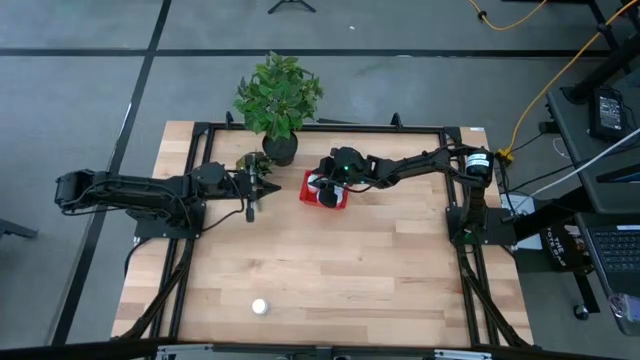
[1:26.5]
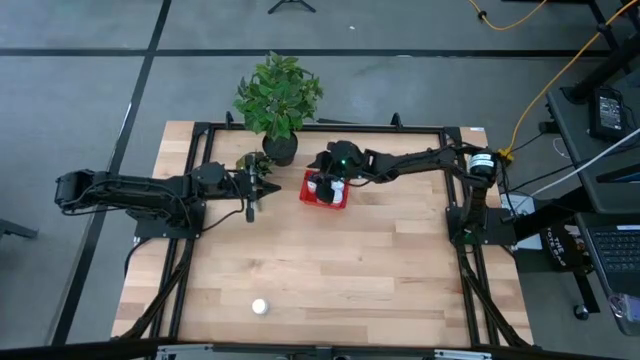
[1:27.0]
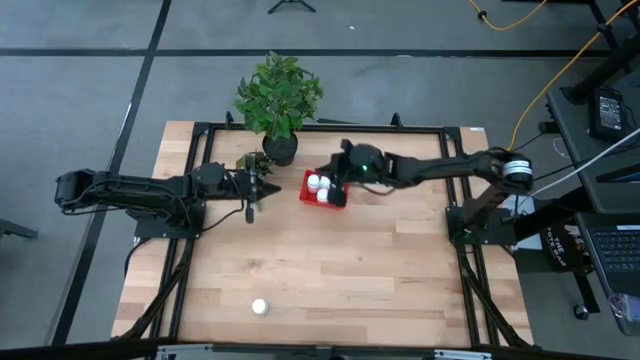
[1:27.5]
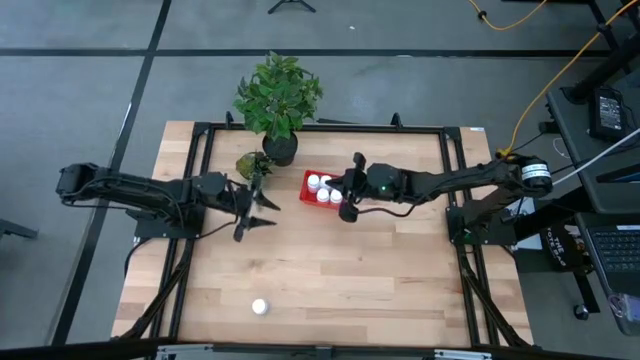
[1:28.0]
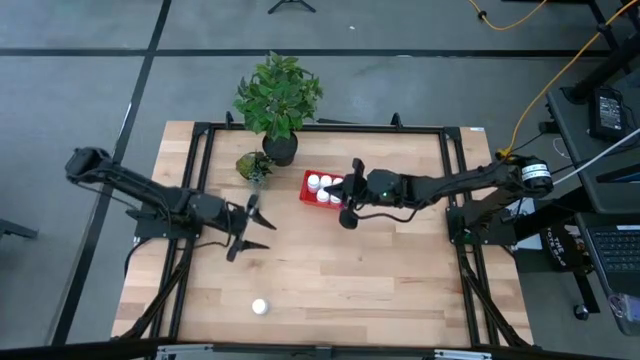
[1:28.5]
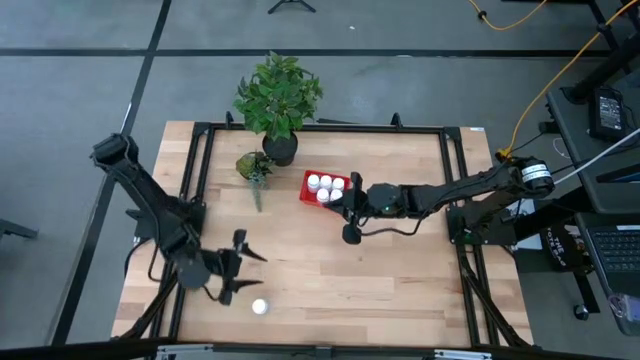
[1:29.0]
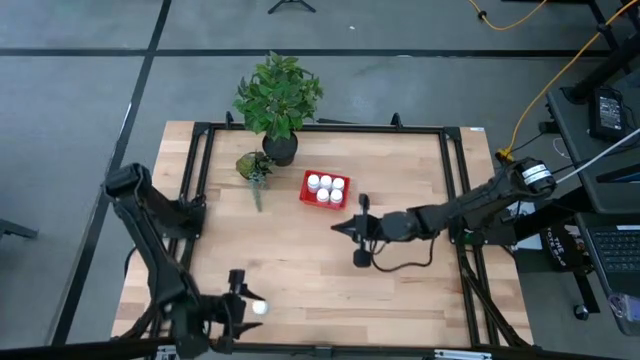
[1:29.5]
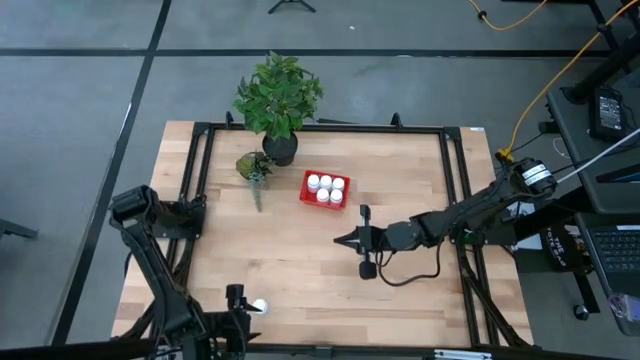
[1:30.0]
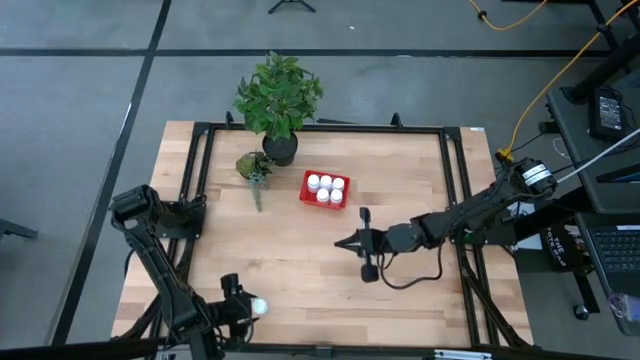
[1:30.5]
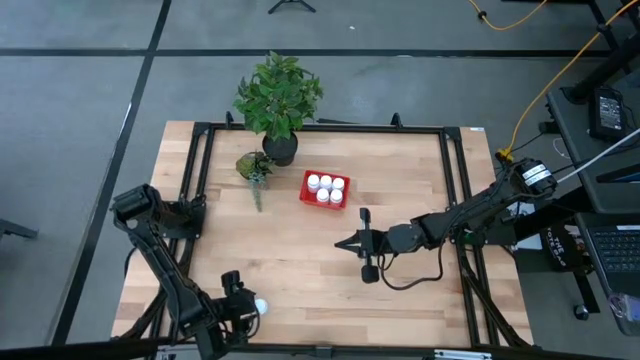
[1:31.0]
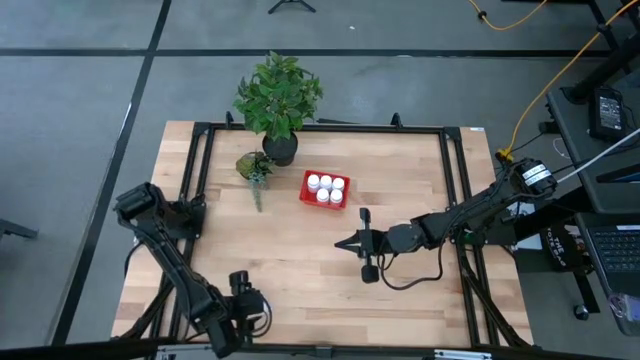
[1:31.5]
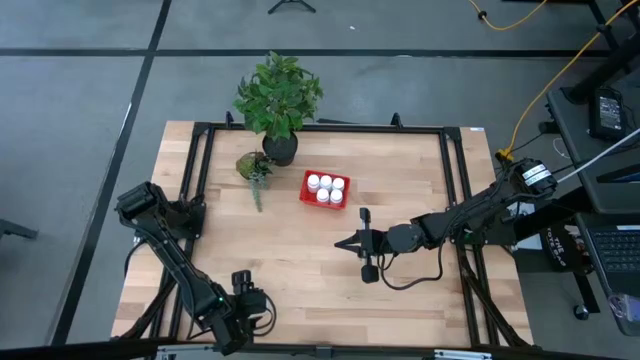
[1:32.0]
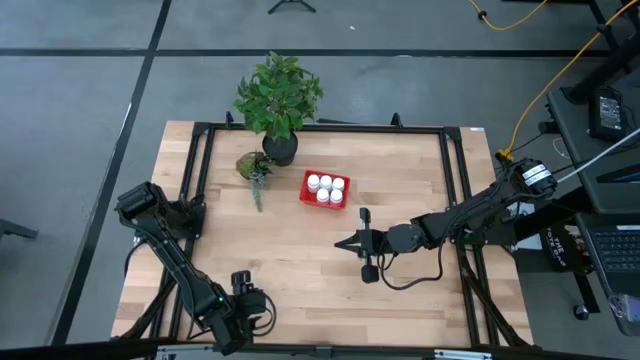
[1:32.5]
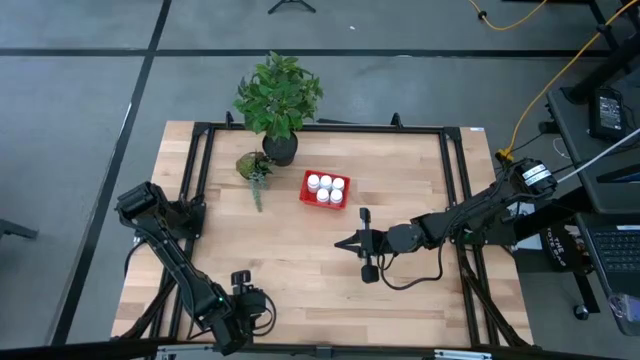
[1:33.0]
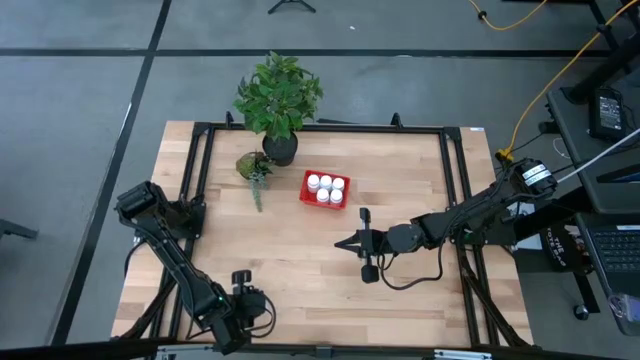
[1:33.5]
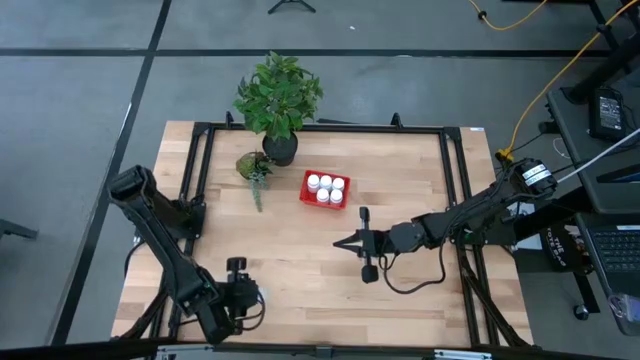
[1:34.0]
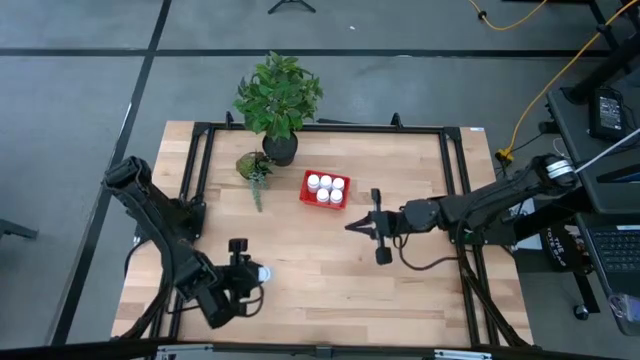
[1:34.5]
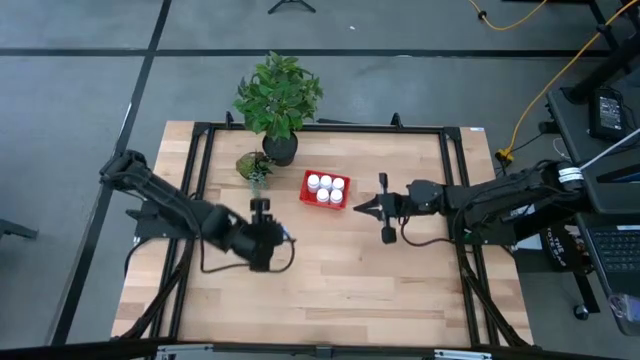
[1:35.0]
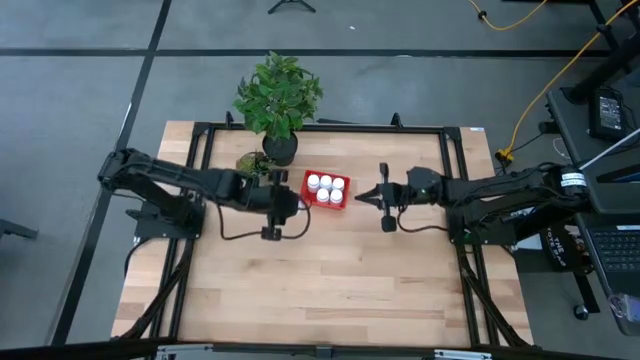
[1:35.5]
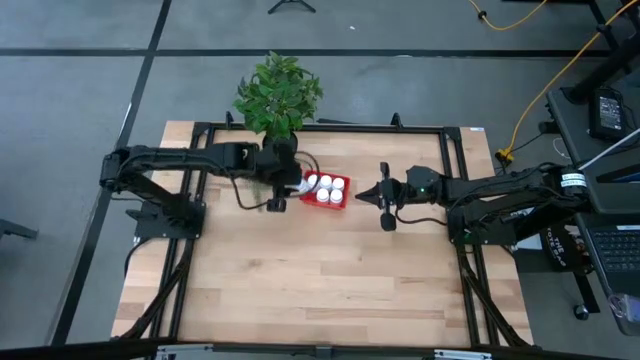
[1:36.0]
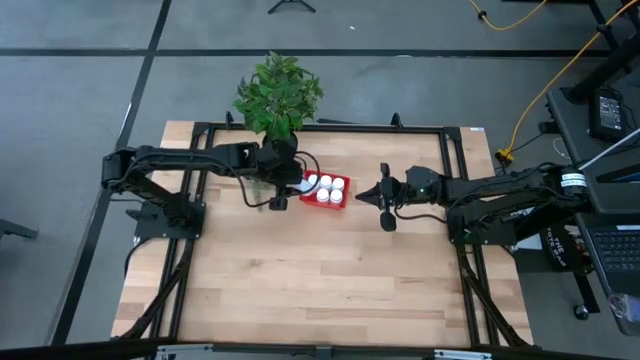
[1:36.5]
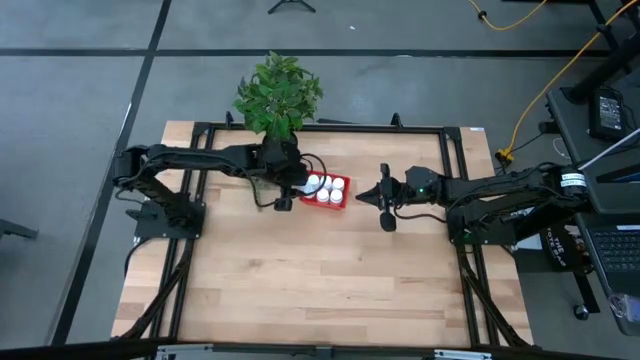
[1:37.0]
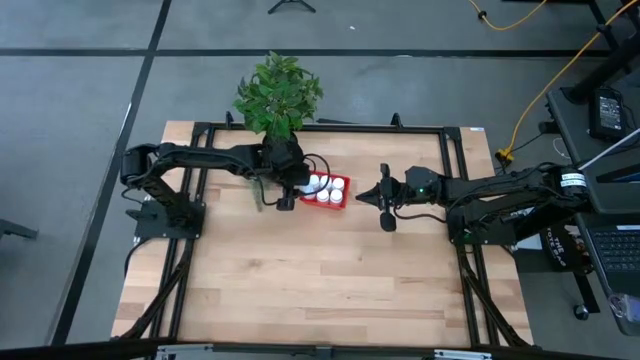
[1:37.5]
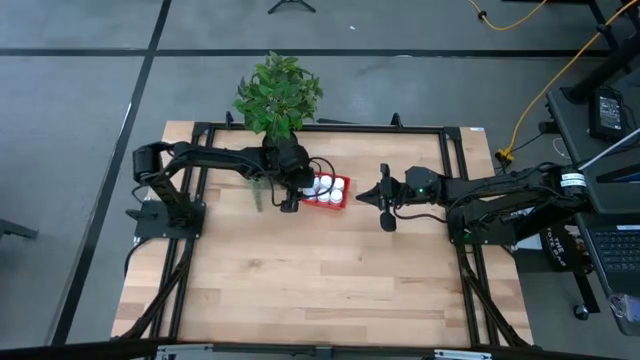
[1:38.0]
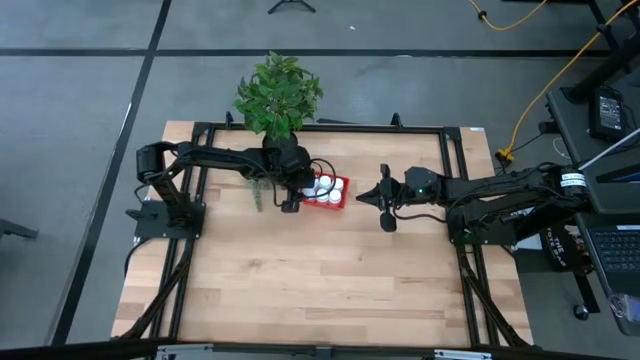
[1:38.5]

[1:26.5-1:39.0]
Task: Pick and place pill bottles into a basket
Put the white medicine bottle into the red bin

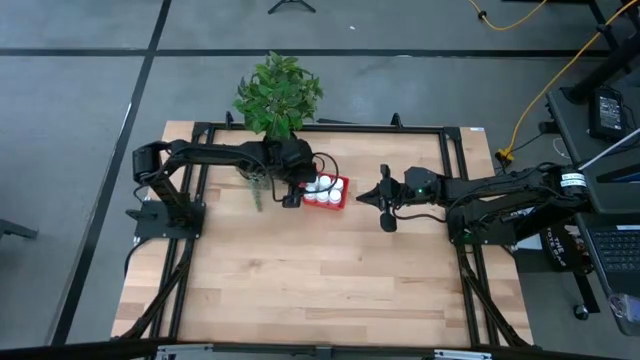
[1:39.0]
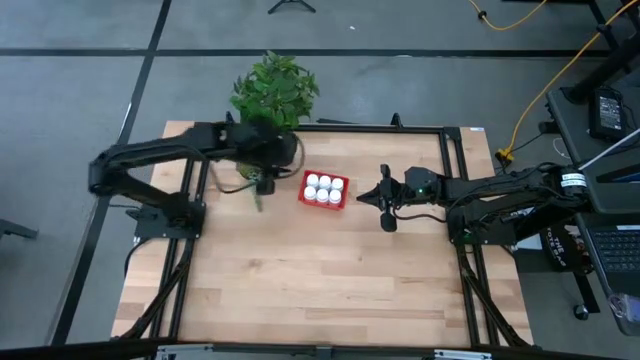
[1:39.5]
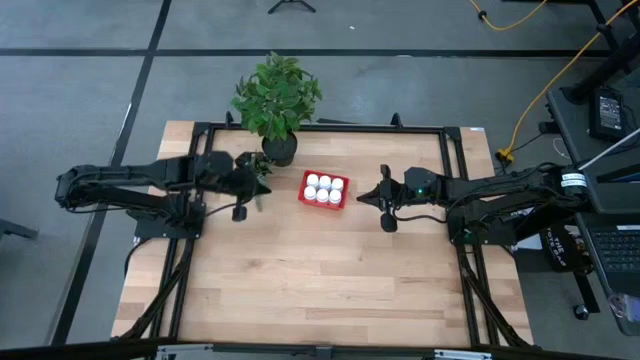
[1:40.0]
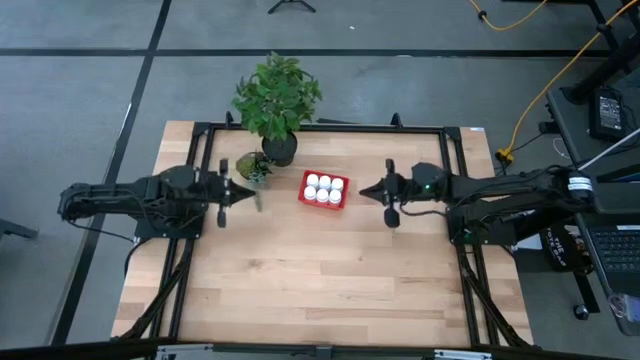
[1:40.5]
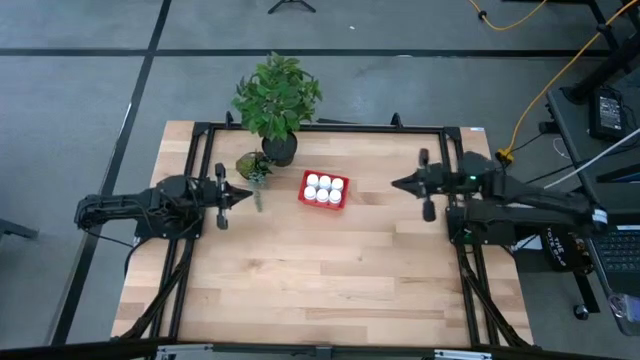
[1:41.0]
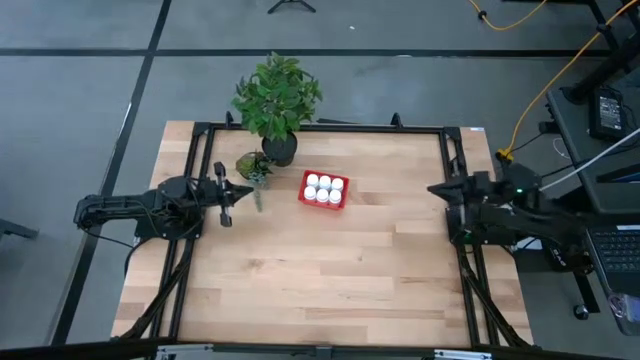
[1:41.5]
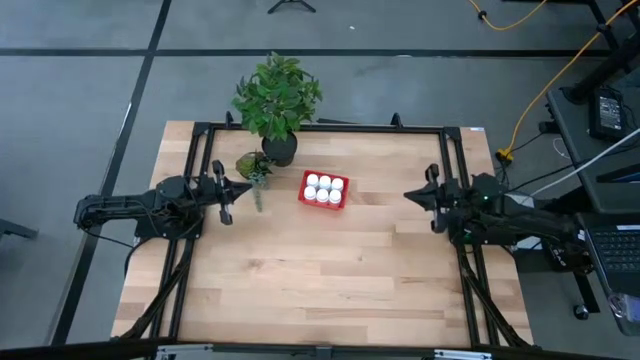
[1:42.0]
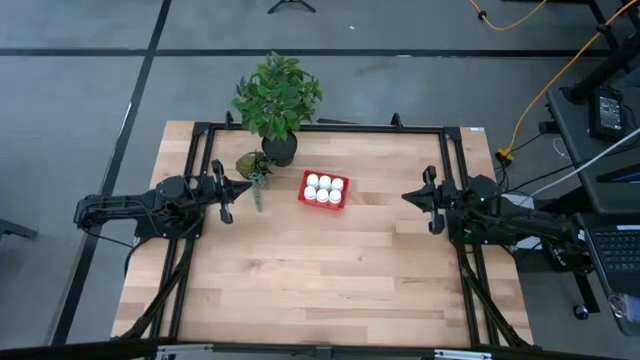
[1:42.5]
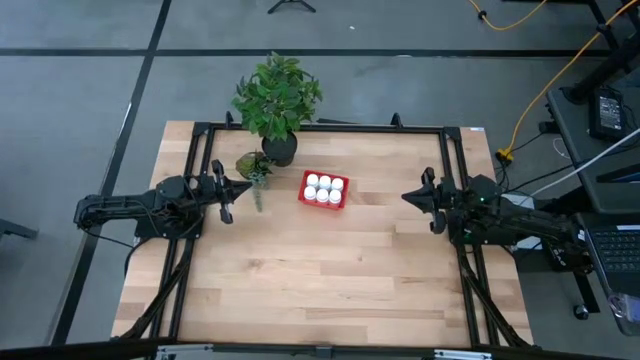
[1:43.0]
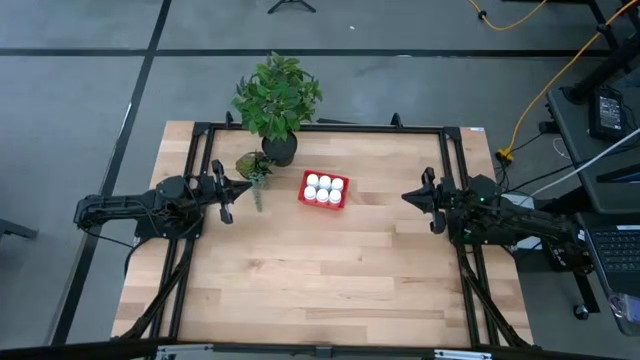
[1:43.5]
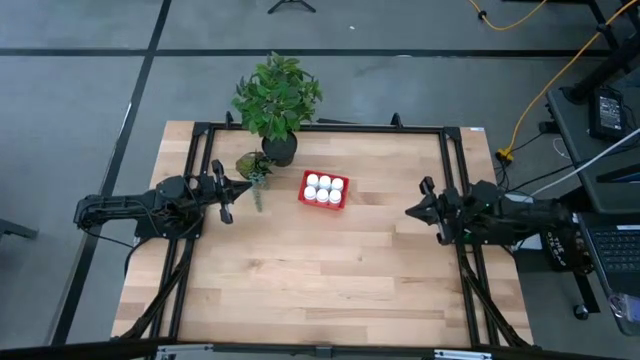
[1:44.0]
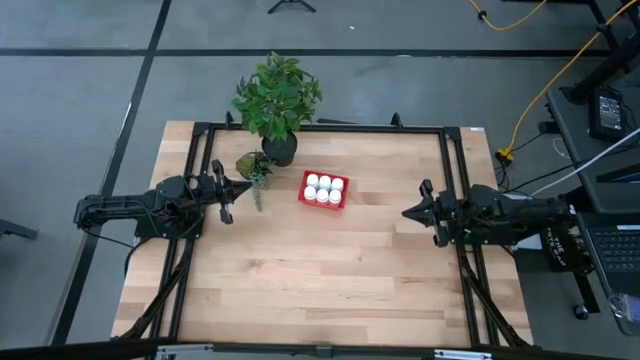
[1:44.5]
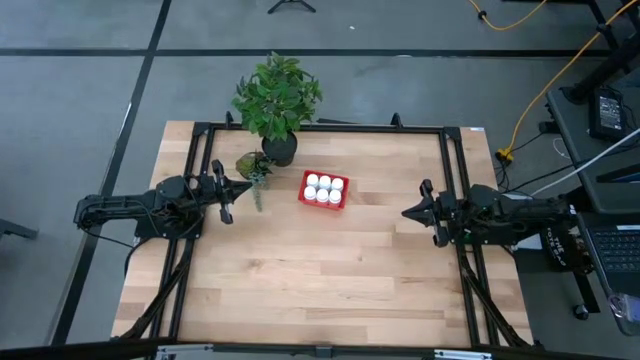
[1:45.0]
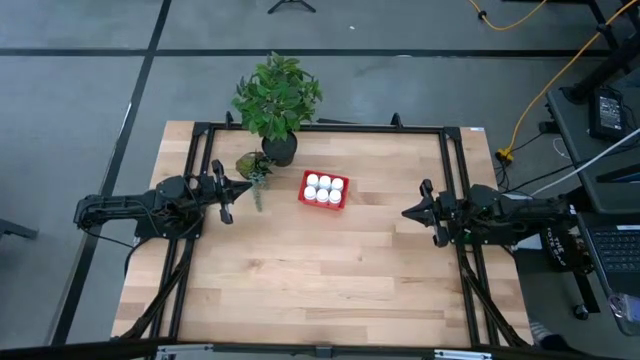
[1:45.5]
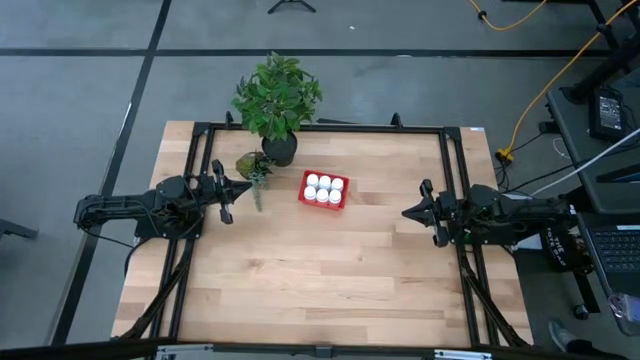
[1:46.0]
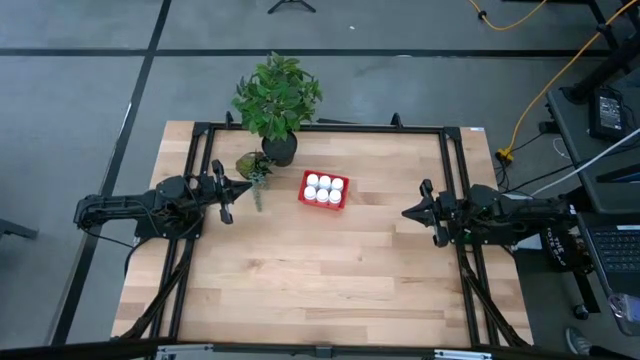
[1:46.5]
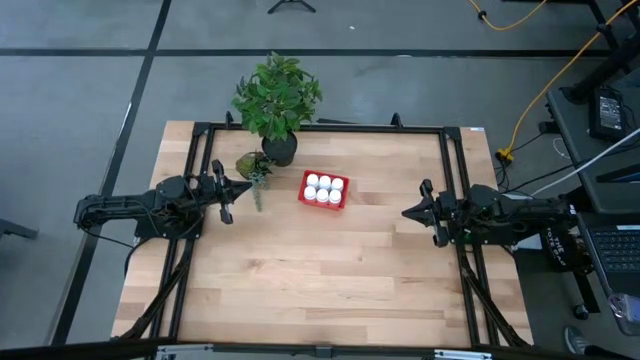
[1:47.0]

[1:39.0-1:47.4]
Return to Home Position
